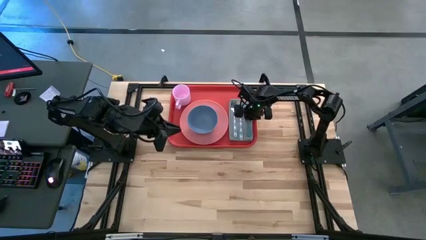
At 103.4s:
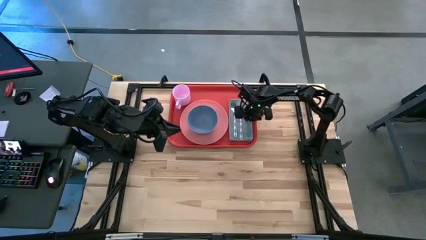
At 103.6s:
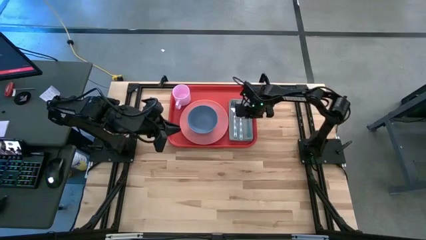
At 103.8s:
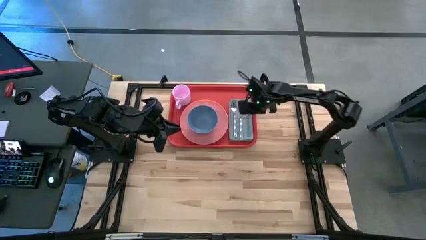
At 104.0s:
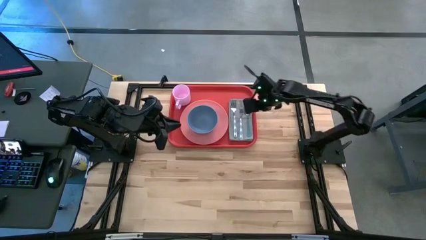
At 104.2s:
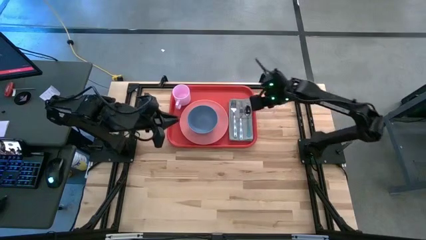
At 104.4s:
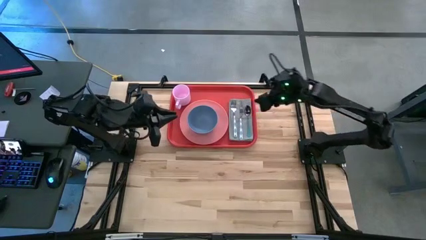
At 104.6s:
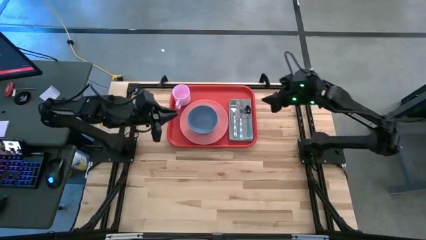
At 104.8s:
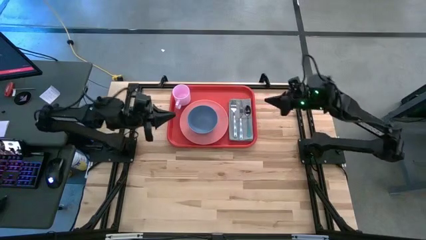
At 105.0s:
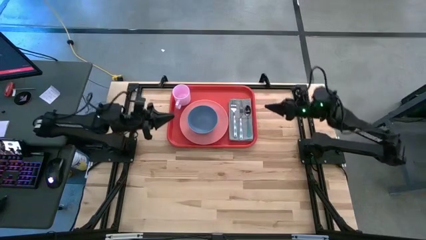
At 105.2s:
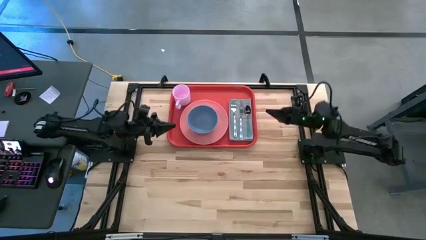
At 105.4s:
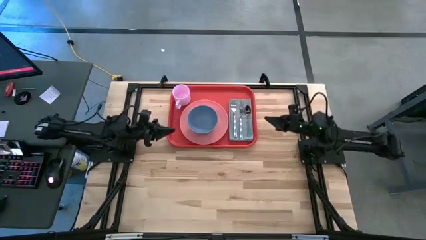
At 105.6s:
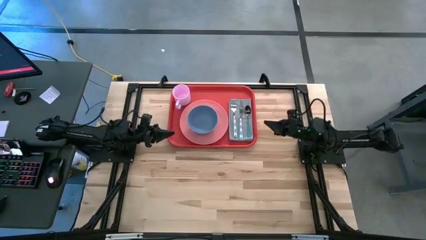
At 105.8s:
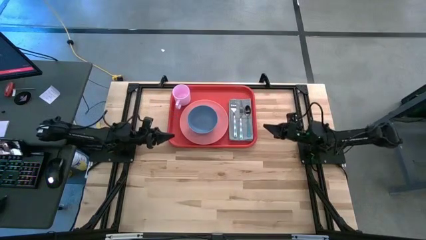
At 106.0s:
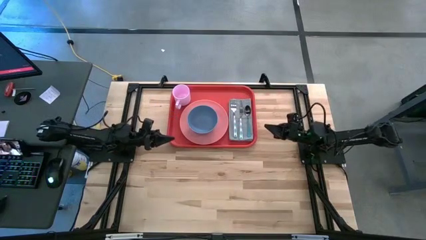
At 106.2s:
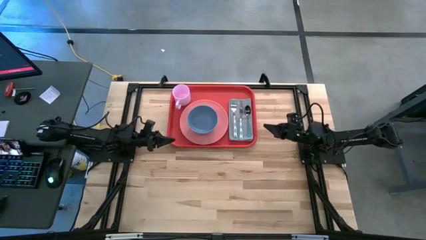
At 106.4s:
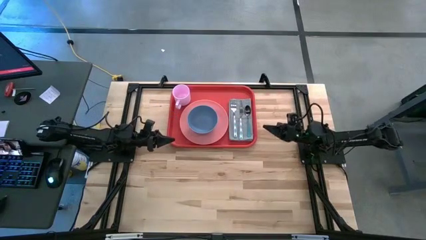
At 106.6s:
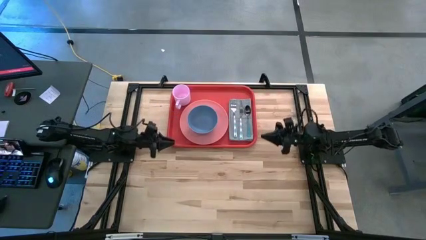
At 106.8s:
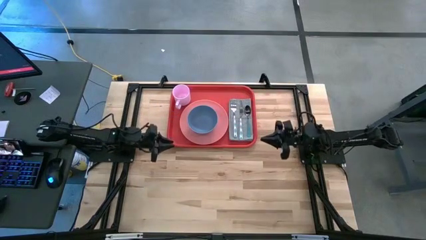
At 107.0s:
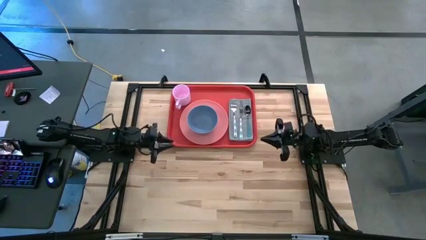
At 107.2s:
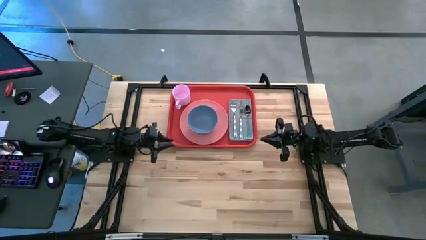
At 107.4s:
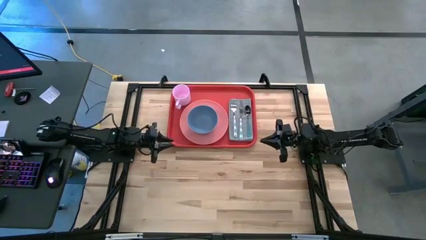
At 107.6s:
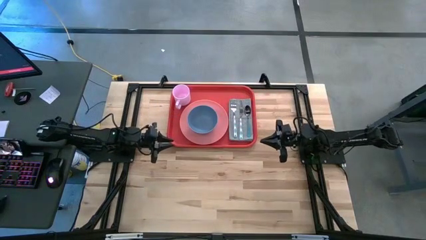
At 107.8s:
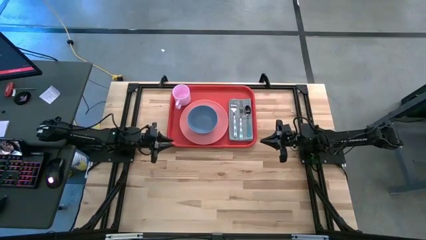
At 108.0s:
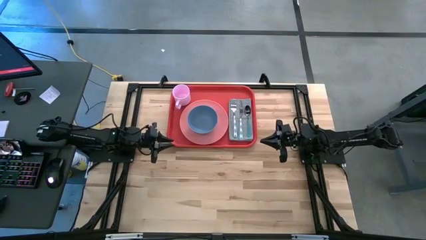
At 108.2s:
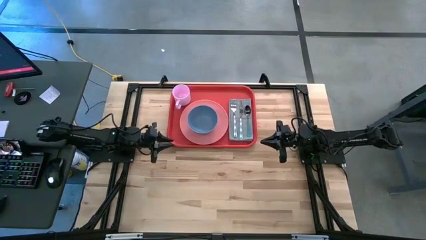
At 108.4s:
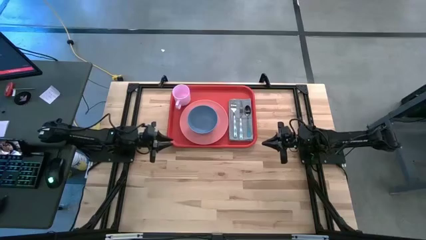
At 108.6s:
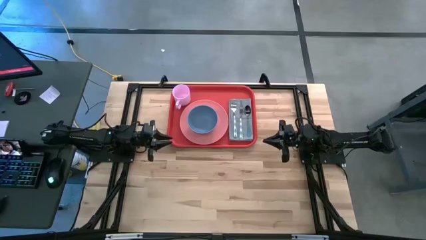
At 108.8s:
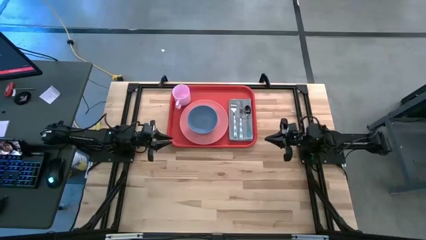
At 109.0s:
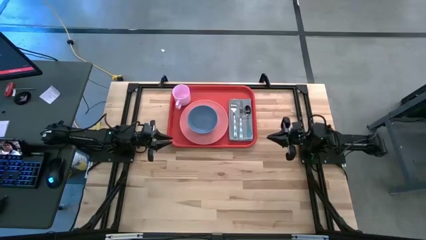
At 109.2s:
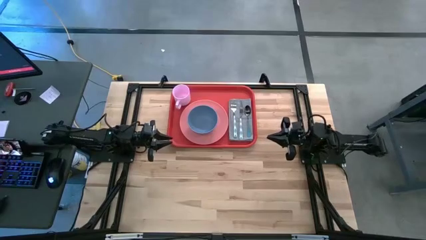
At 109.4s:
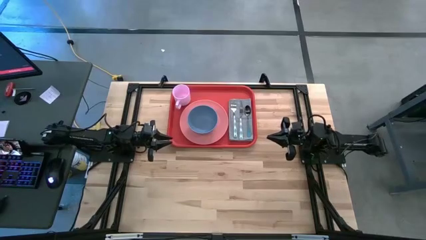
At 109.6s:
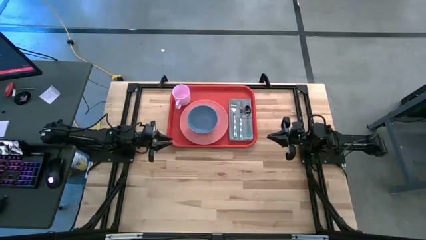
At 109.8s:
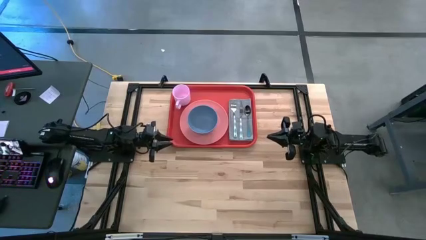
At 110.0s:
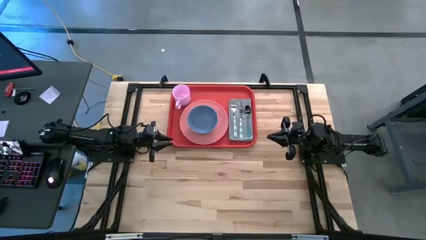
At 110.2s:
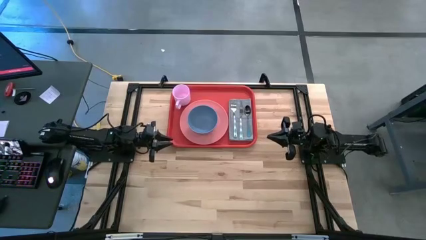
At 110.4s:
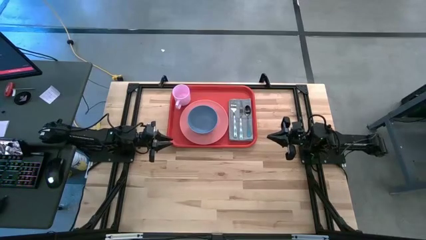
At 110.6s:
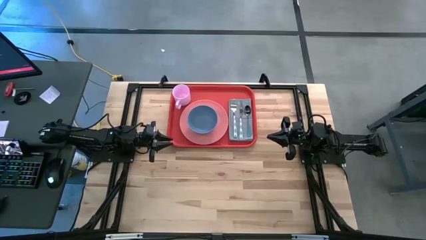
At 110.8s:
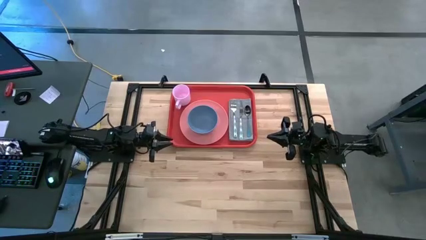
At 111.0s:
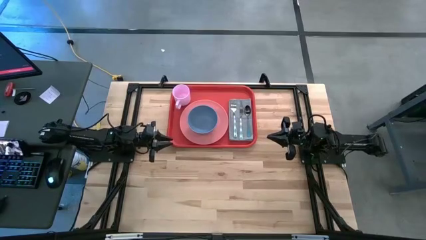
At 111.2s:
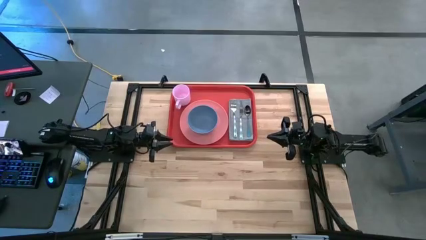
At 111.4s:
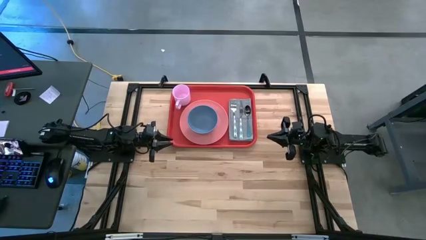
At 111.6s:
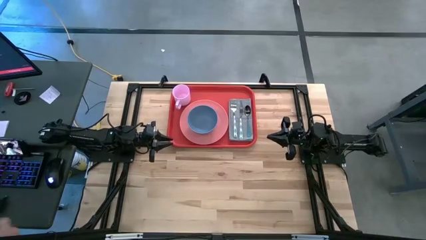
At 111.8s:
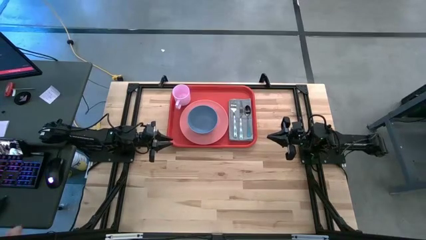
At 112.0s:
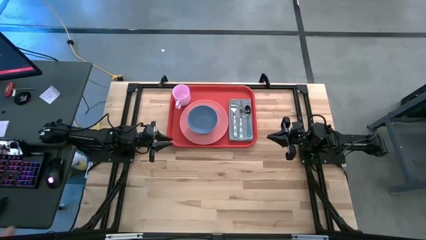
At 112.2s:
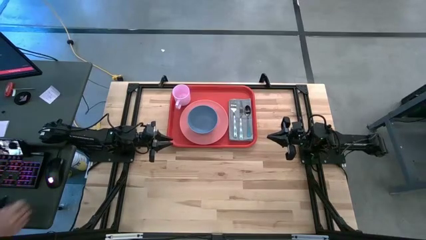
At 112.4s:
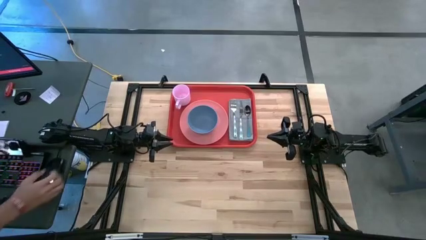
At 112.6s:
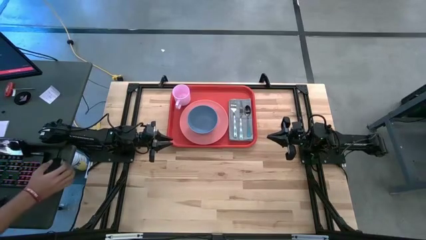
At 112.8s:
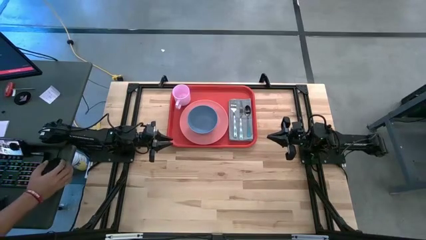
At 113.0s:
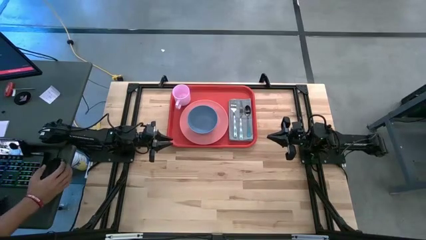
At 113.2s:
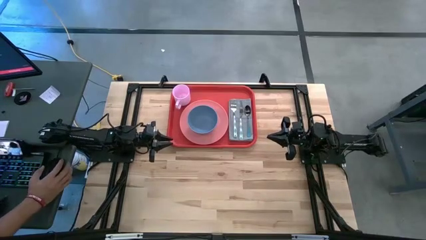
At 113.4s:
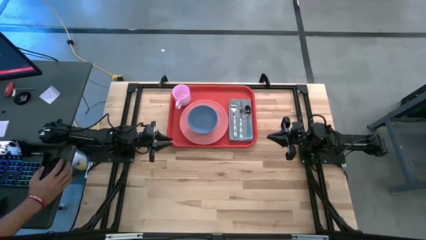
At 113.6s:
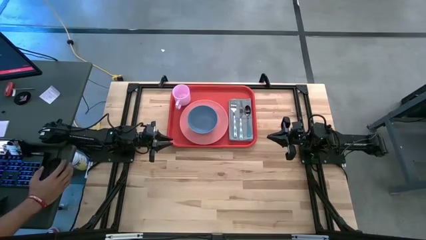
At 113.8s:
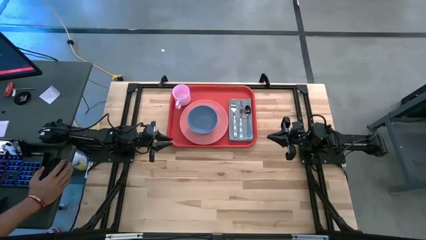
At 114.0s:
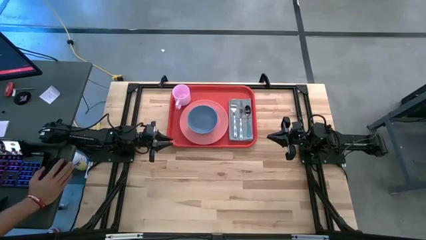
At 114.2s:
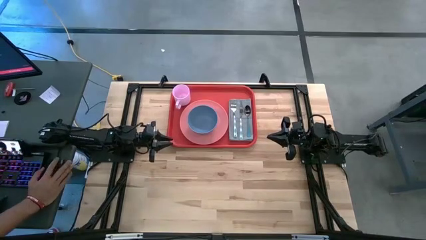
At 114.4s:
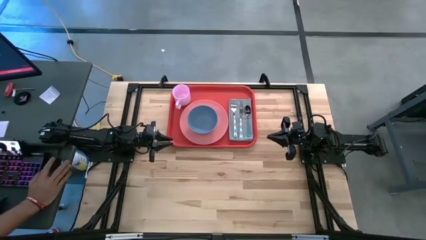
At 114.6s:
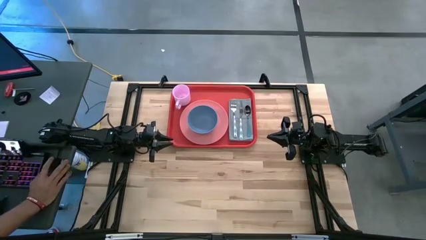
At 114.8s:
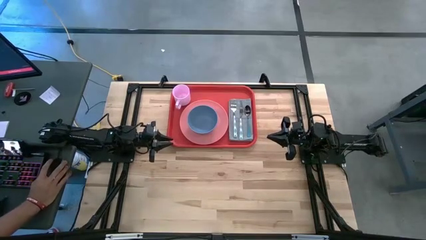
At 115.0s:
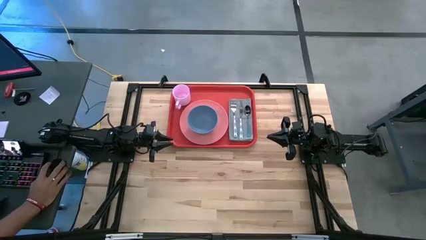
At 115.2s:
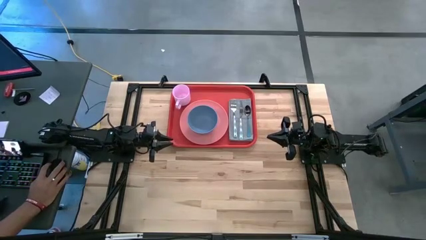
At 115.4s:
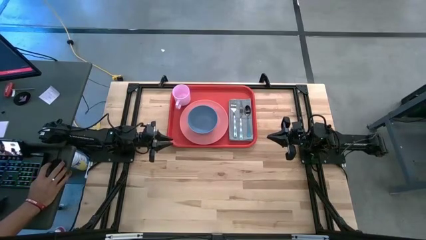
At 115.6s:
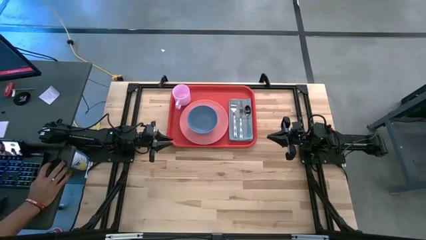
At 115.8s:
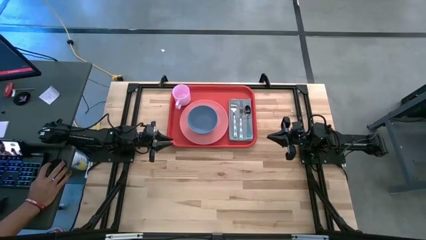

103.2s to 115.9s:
Task: Set up tray
Return to Home Position

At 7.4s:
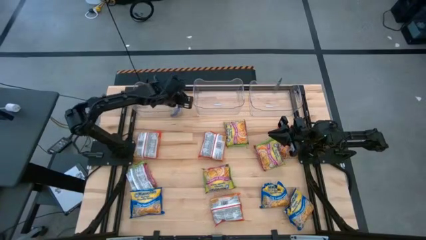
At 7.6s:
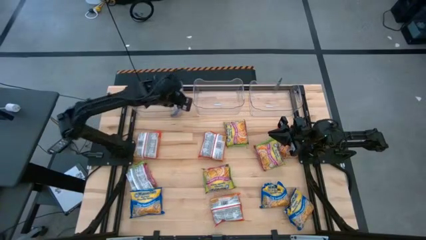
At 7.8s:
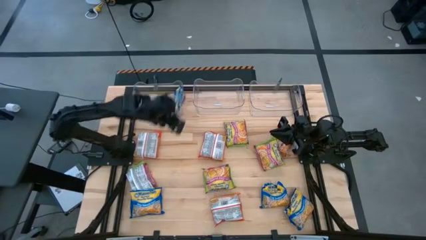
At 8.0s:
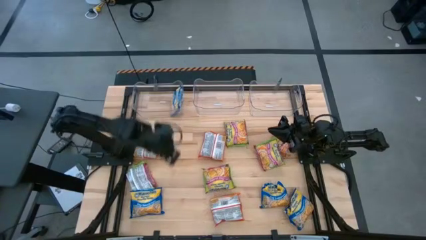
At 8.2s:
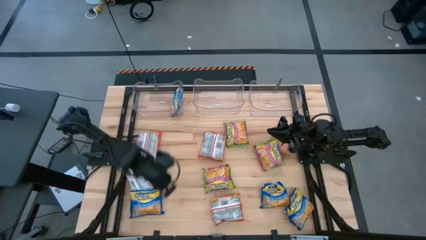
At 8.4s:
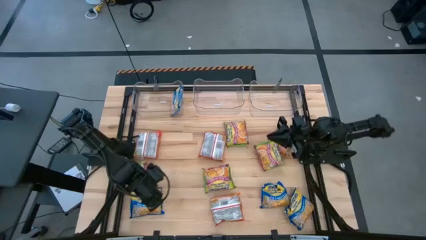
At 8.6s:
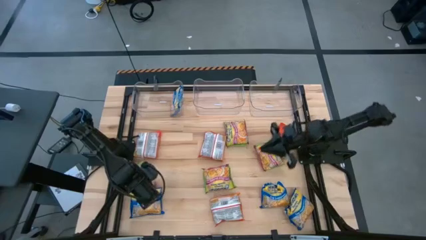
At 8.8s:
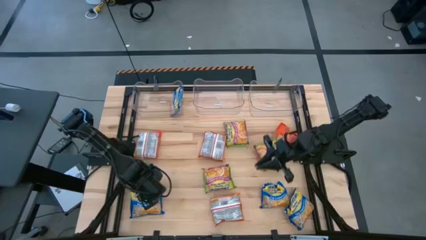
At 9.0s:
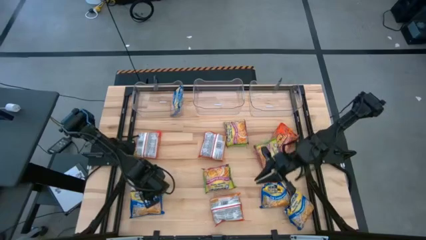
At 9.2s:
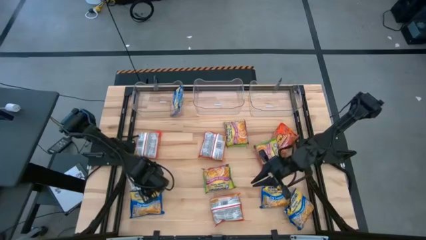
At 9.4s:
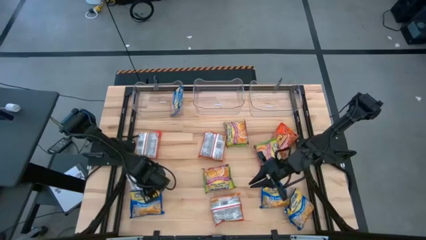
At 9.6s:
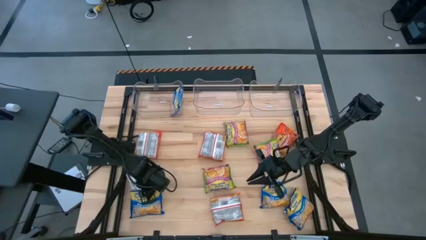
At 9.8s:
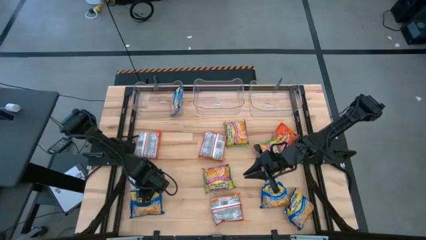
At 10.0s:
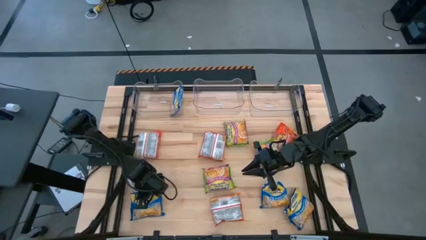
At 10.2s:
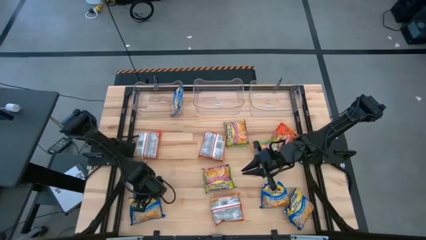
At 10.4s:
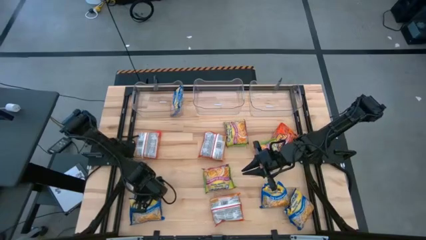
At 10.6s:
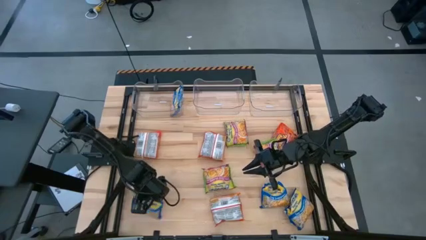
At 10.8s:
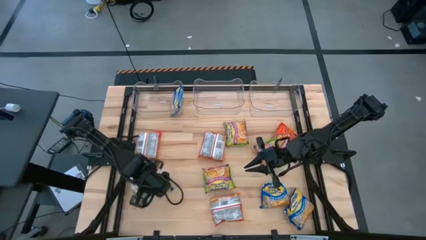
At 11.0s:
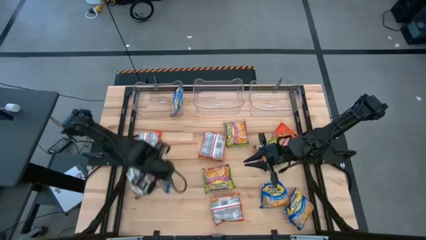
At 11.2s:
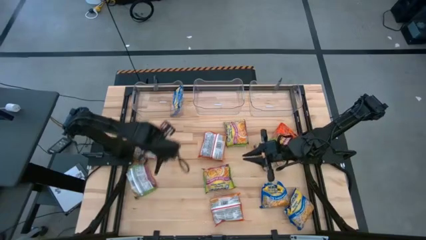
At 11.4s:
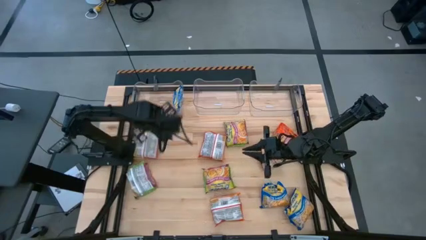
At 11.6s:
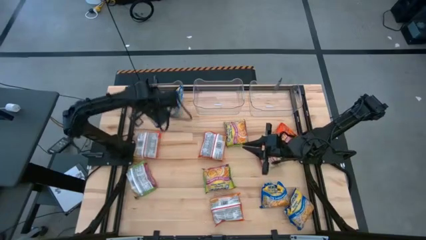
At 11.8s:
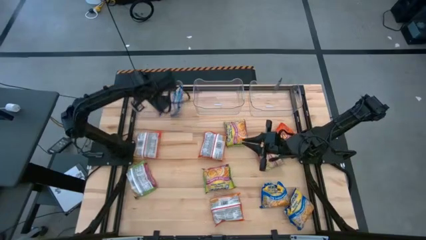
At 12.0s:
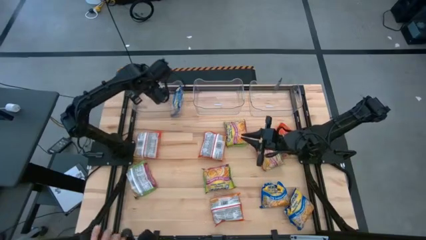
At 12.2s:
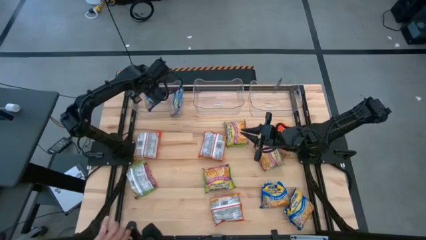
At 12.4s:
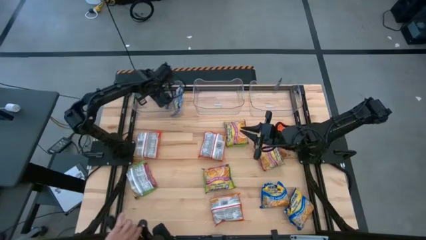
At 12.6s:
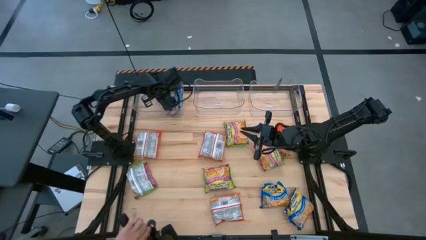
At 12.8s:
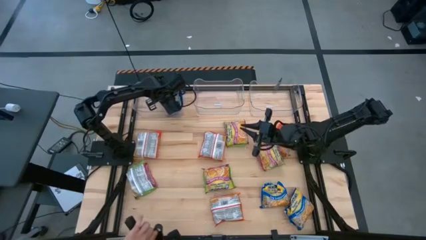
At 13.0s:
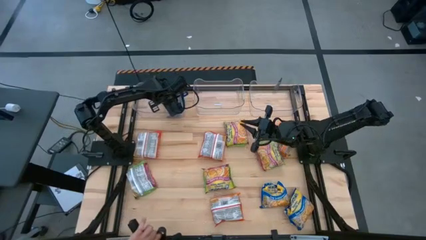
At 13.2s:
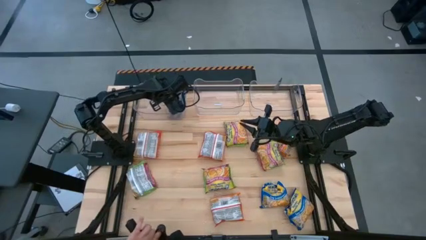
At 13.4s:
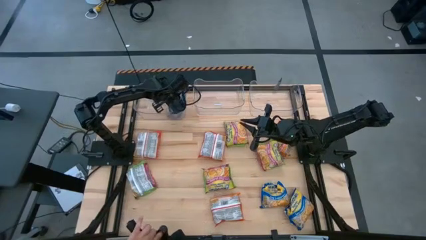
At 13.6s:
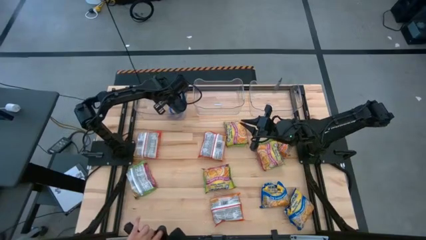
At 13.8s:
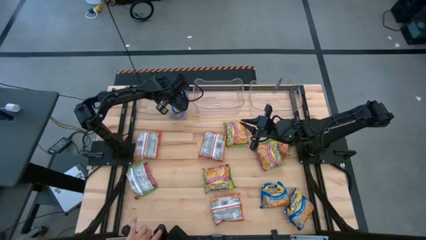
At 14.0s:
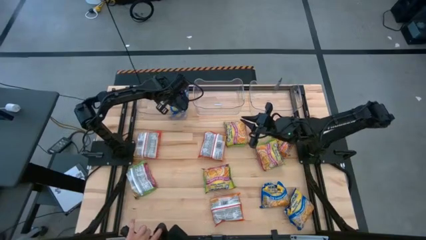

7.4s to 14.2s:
Task: Sort Maruchan noodles
Put the blue noodle pack into the left transparent bin
